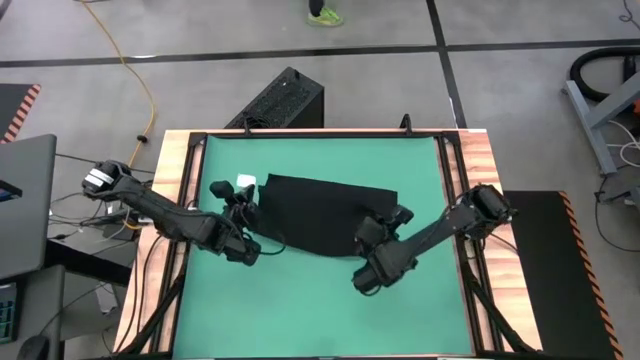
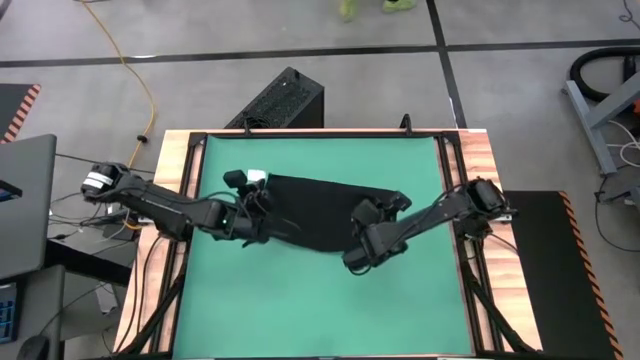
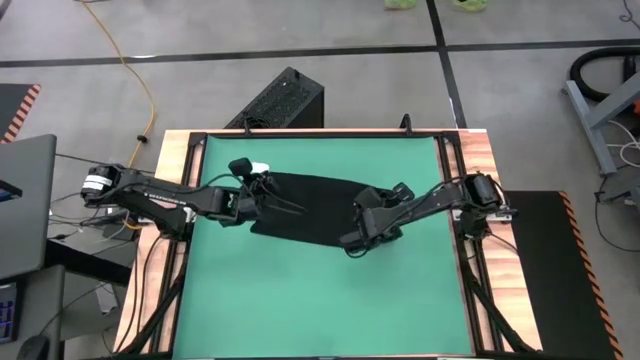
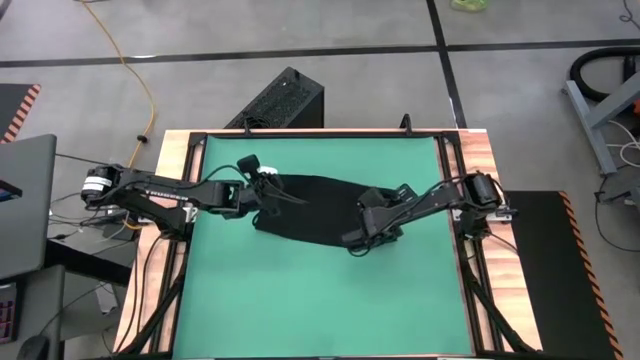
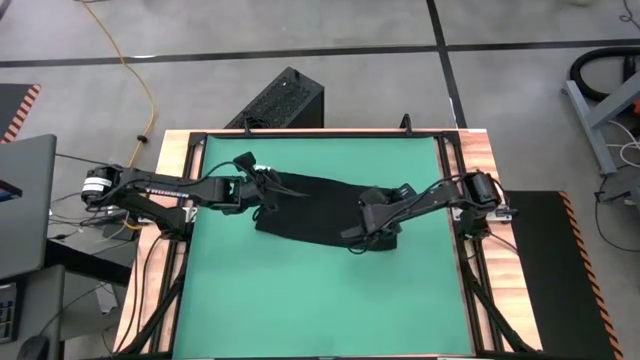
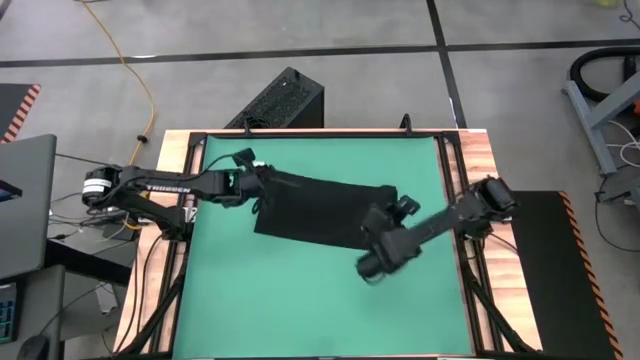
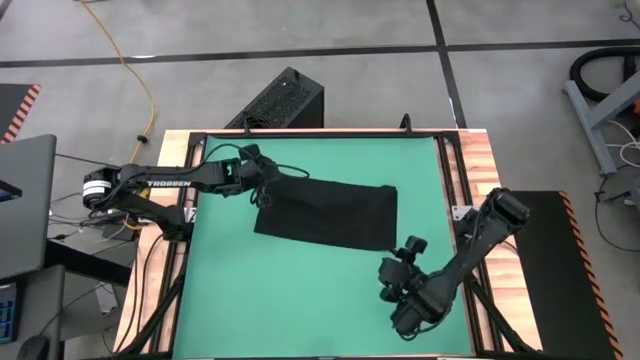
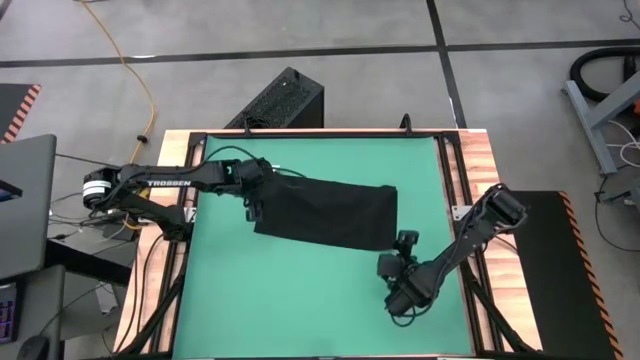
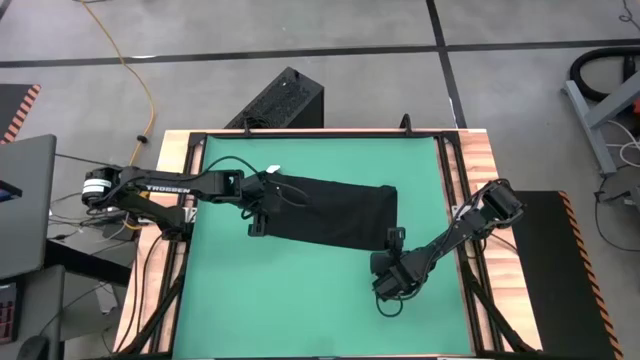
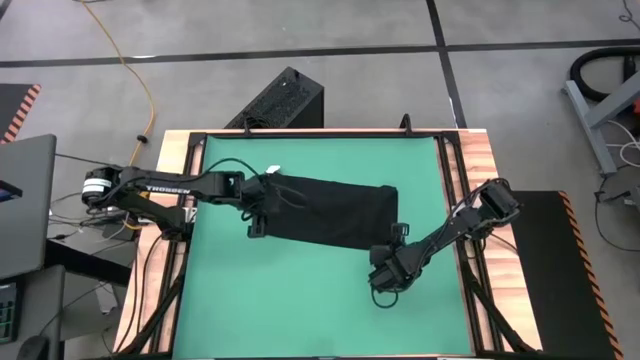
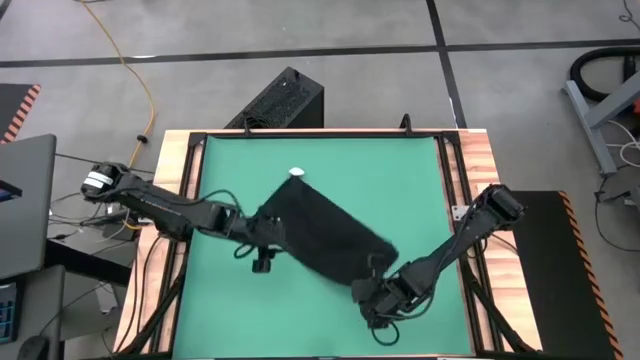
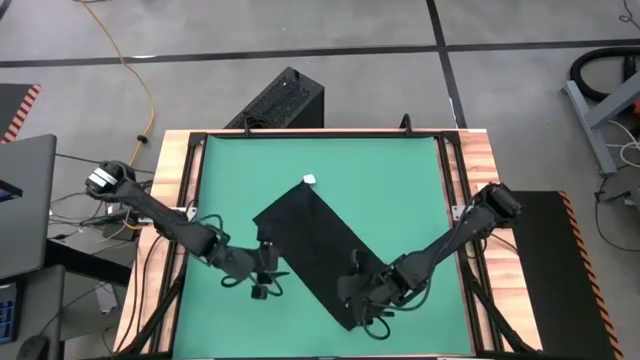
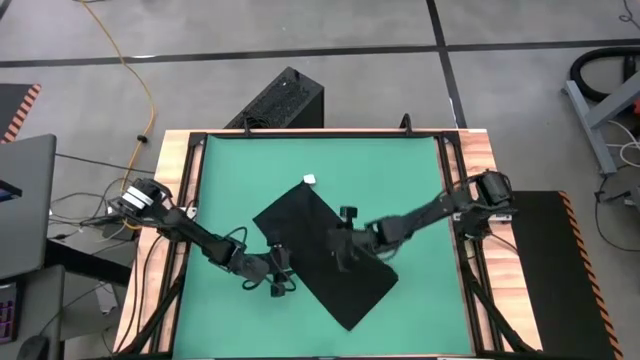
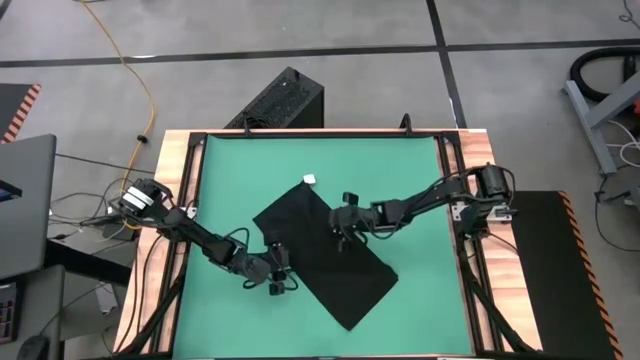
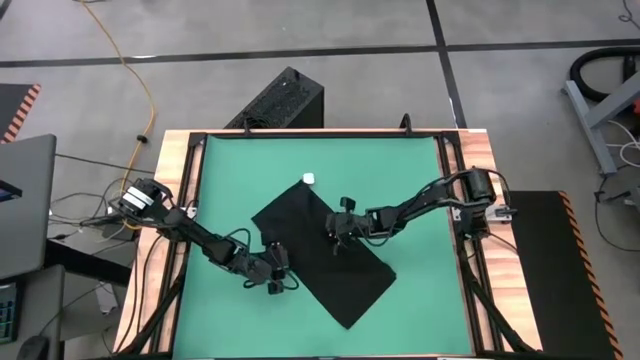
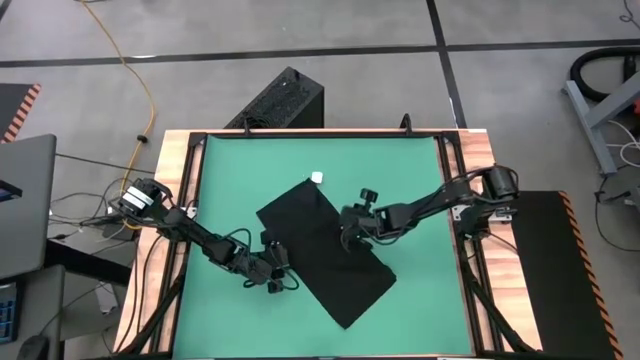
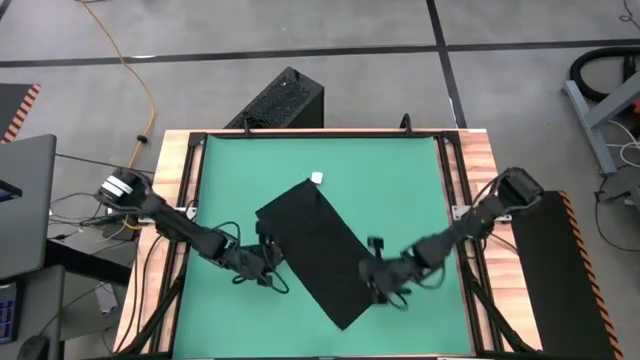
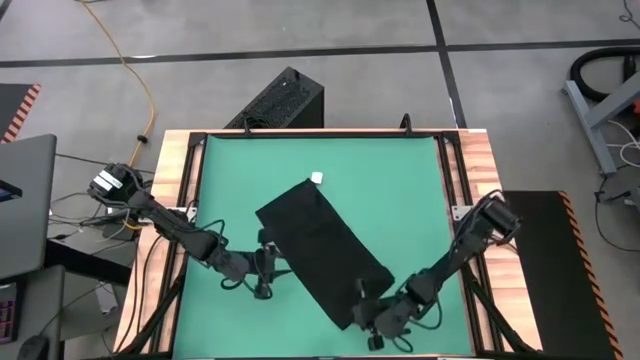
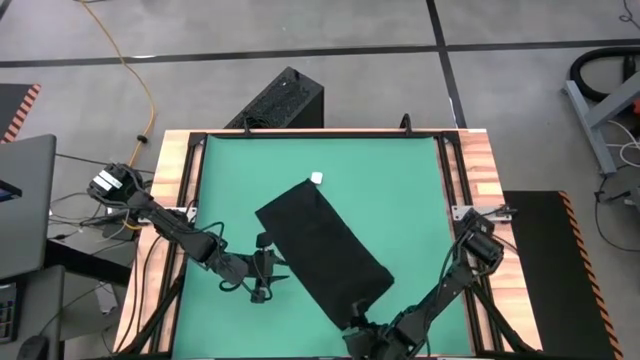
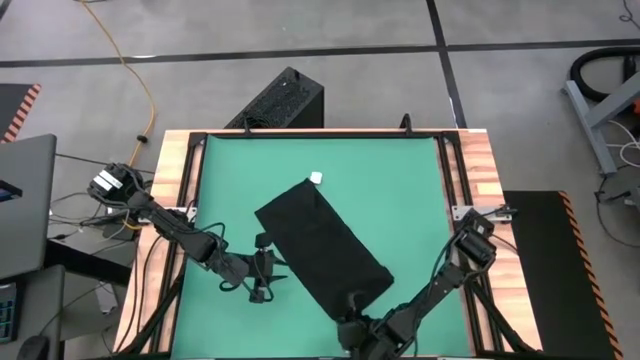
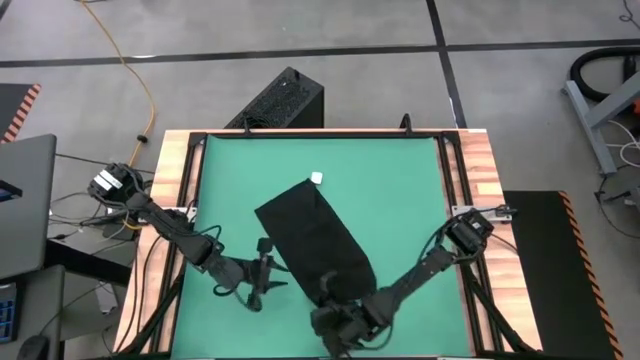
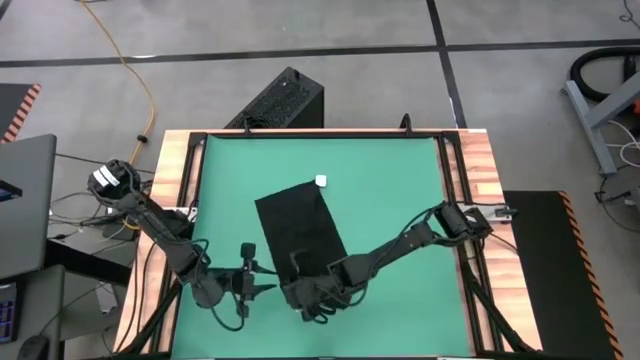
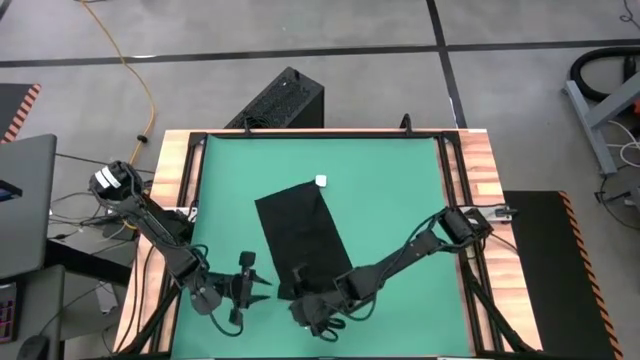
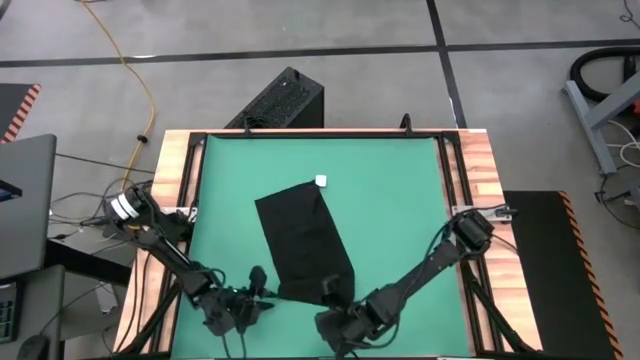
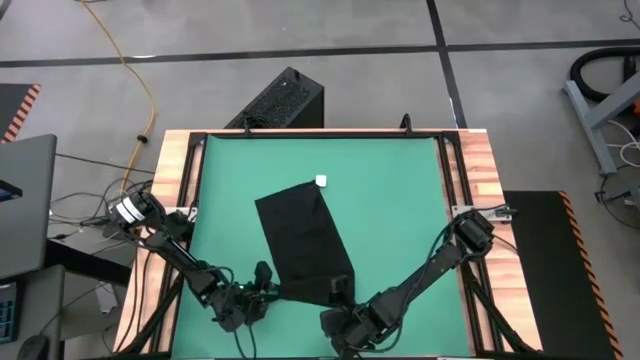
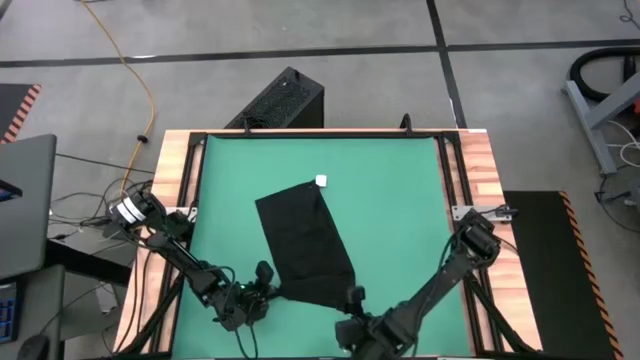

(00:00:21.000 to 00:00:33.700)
Task: Roll towel
Roll the black towel

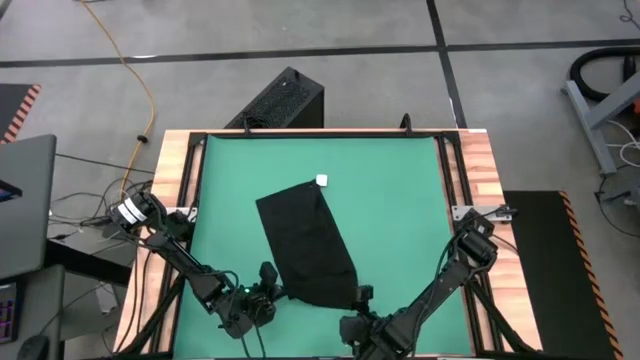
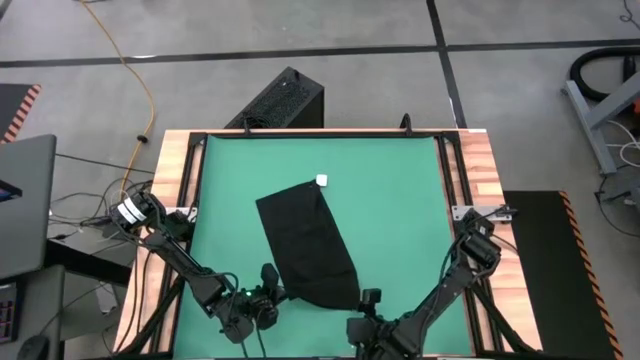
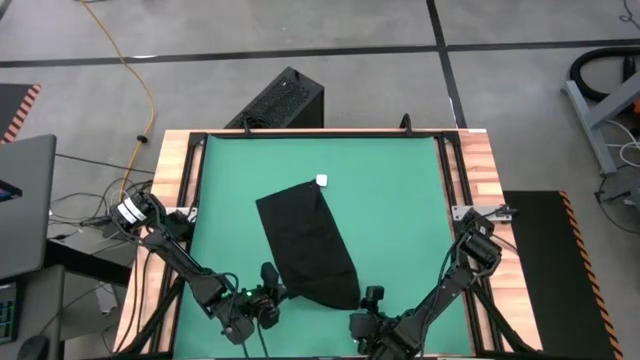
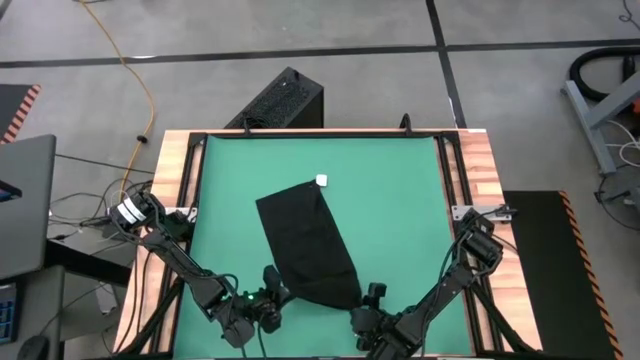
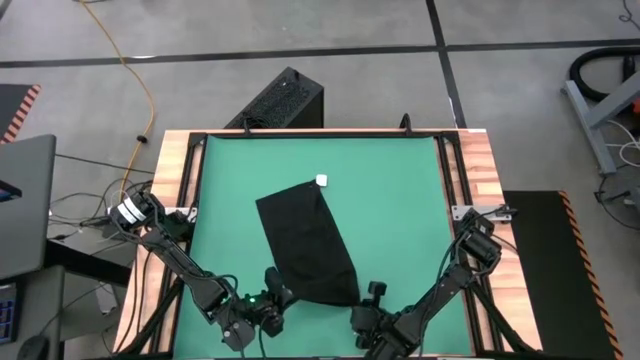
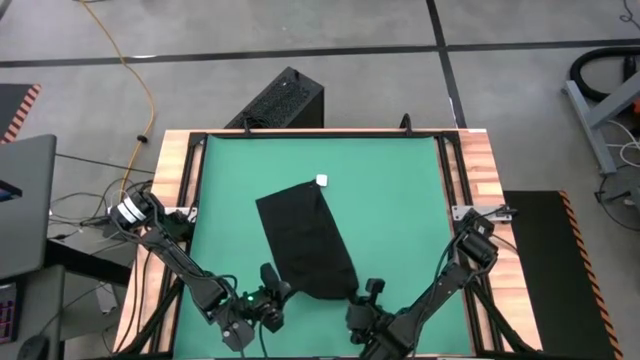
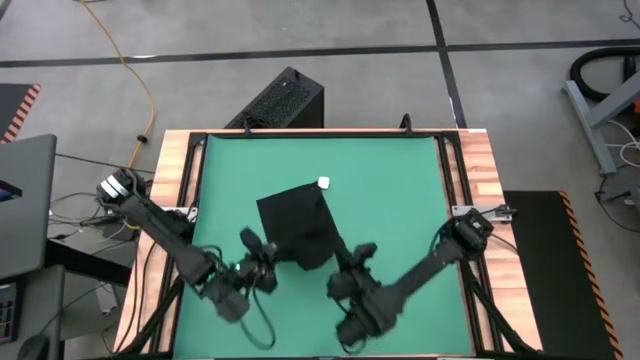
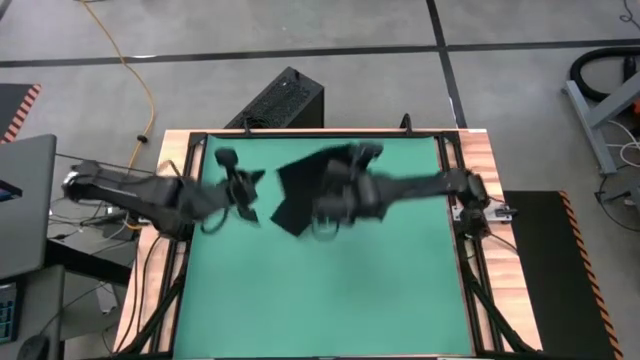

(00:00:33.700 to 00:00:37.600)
Roll the black towel

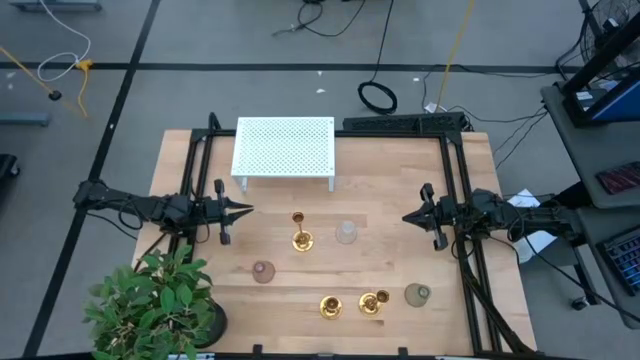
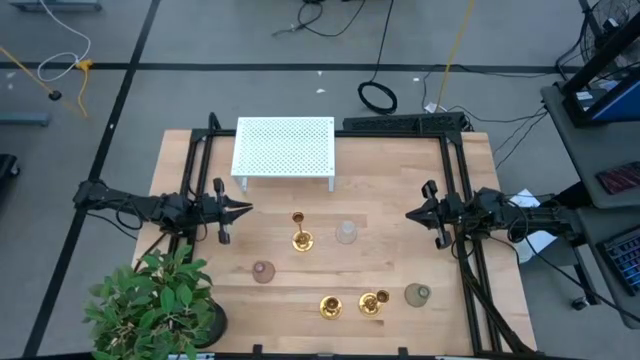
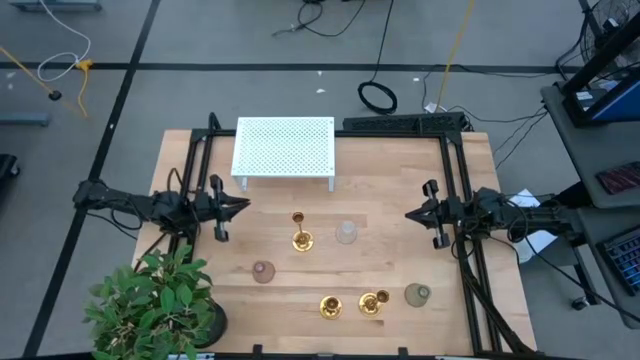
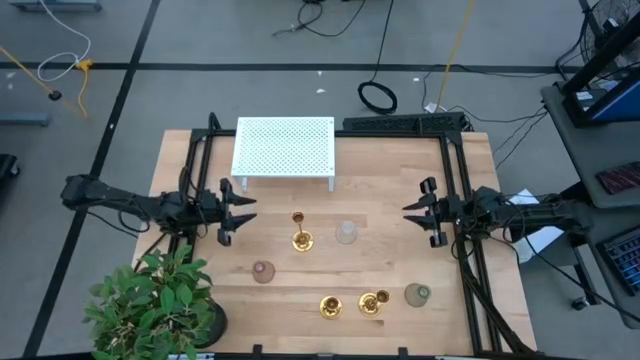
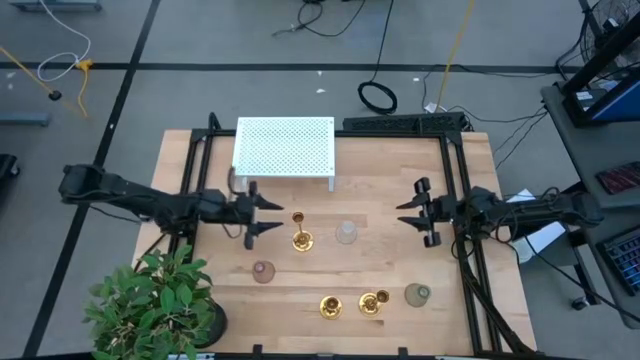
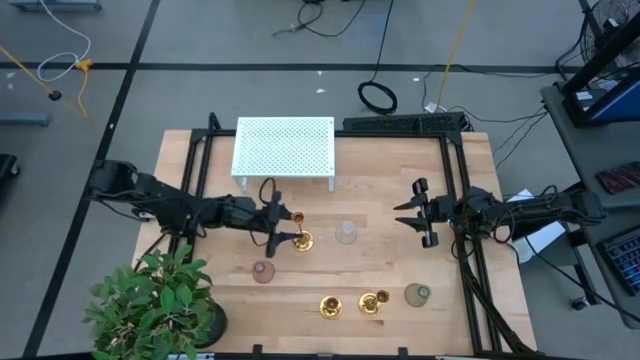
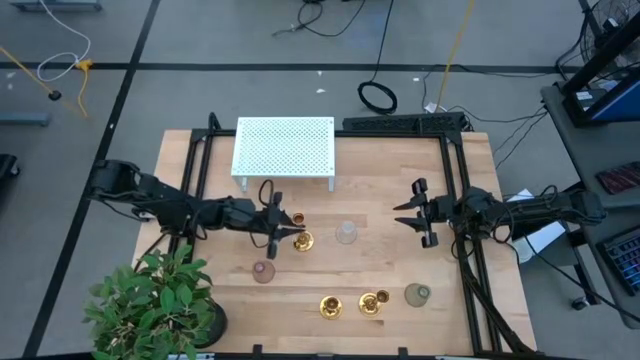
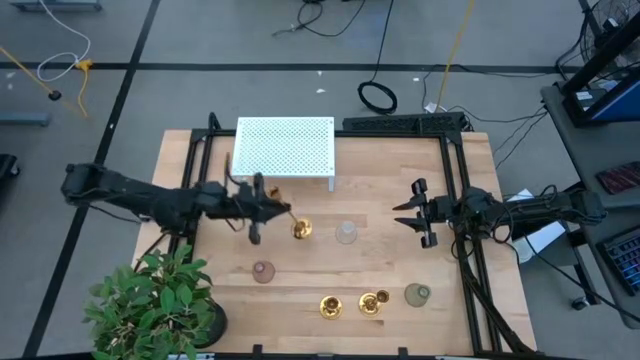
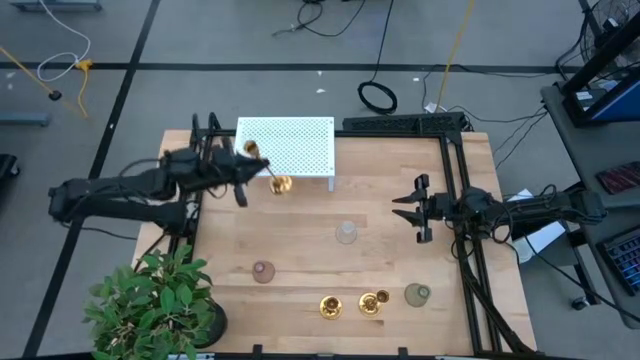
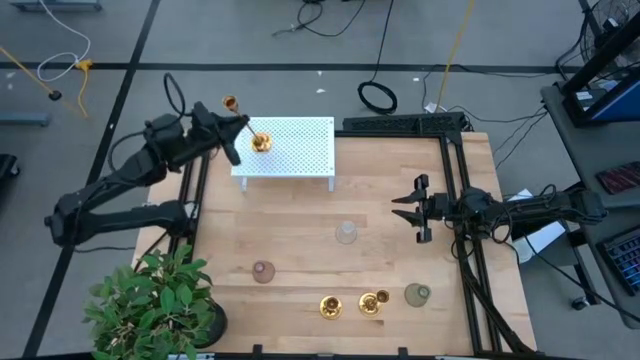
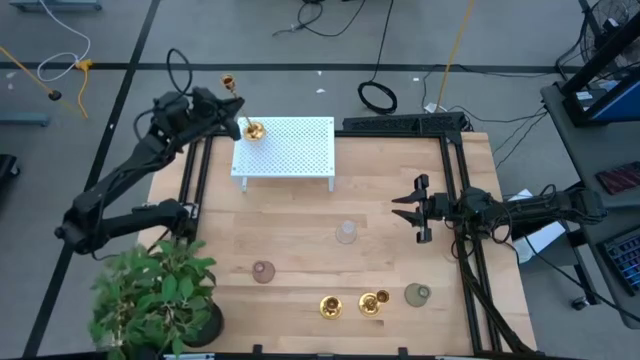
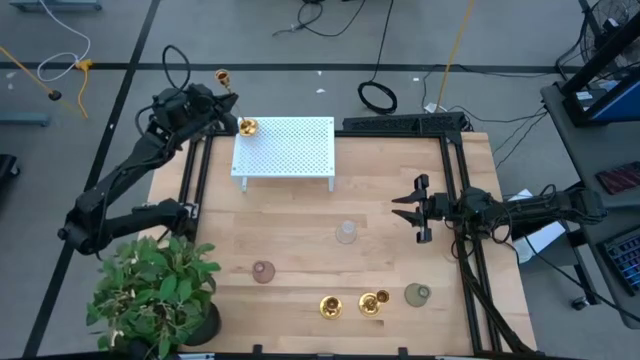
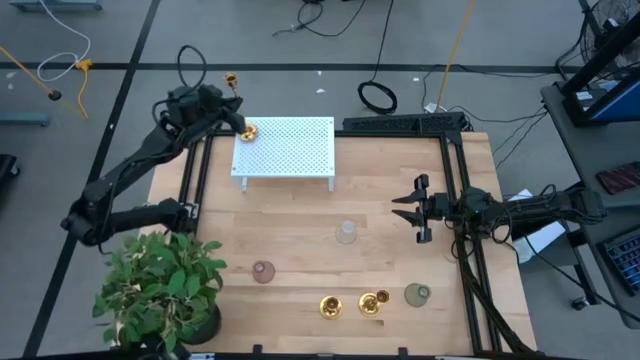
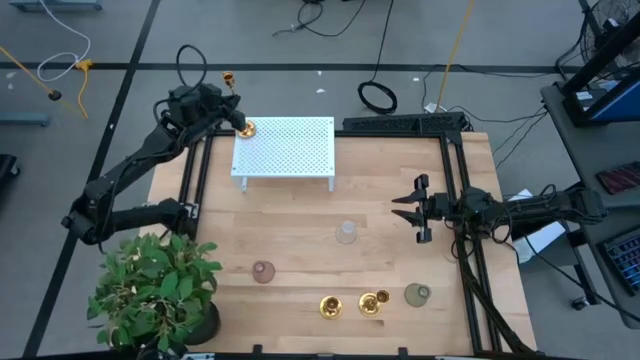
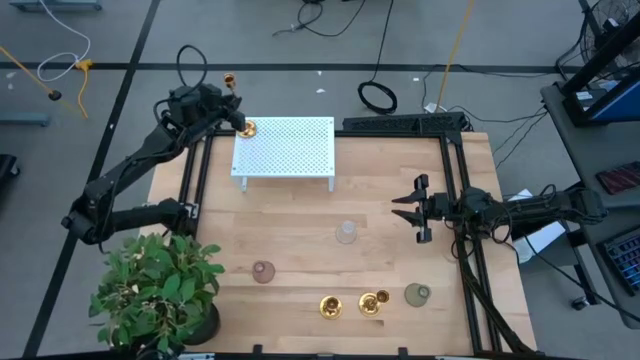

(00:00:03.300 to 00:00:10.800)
Task: Pick & Place candle stick holders
Put the top yellow candle stand on the shelf
